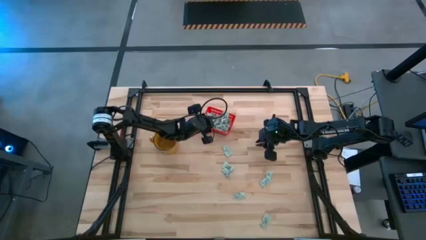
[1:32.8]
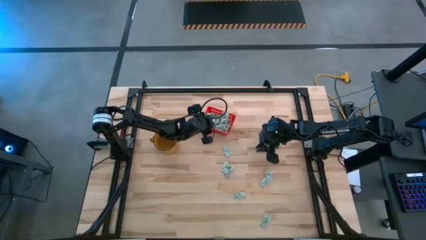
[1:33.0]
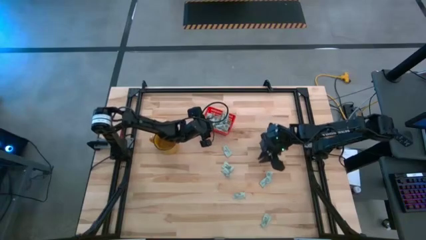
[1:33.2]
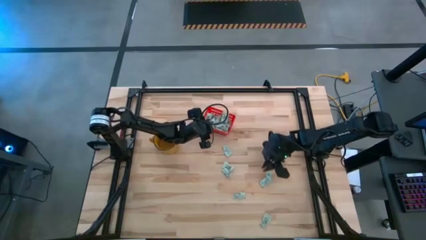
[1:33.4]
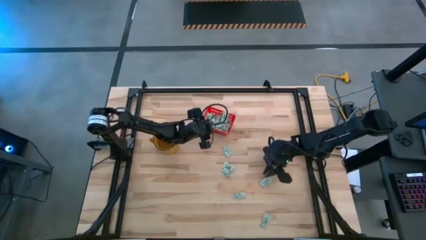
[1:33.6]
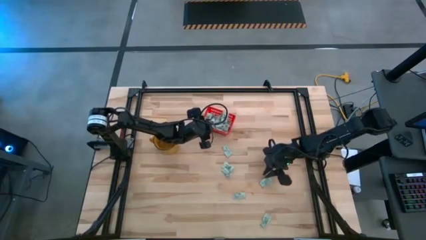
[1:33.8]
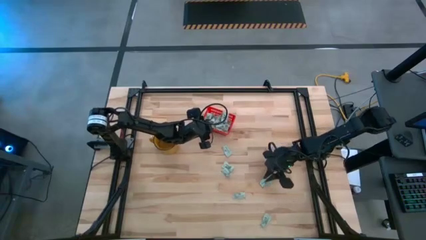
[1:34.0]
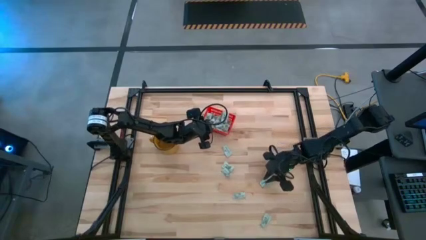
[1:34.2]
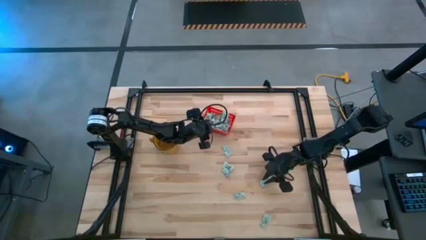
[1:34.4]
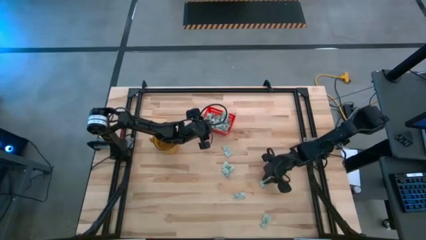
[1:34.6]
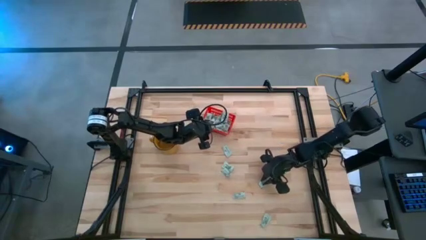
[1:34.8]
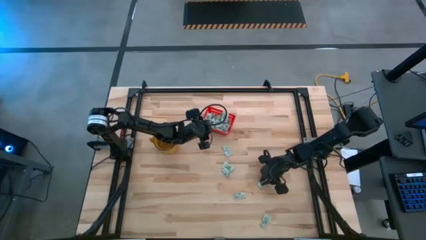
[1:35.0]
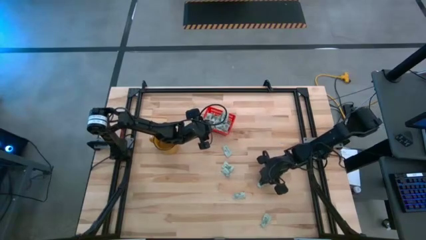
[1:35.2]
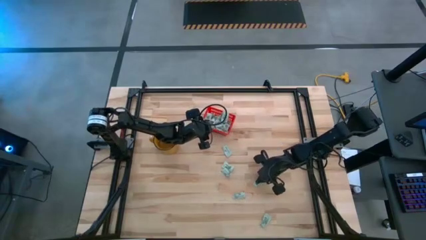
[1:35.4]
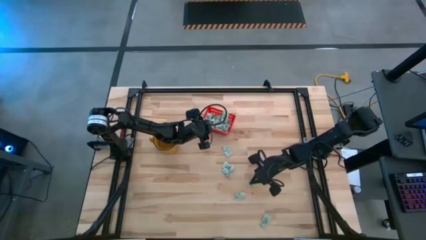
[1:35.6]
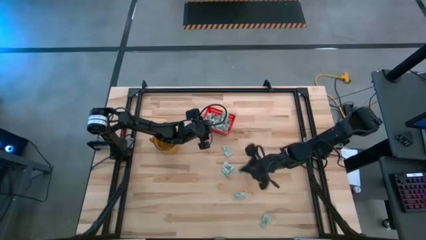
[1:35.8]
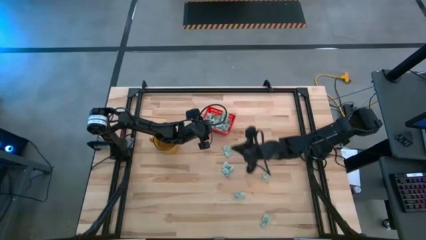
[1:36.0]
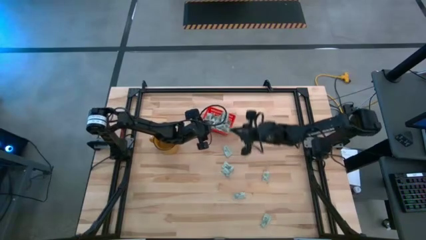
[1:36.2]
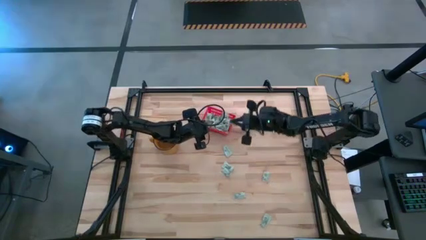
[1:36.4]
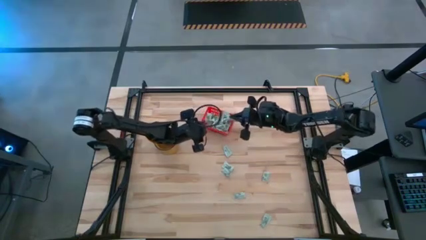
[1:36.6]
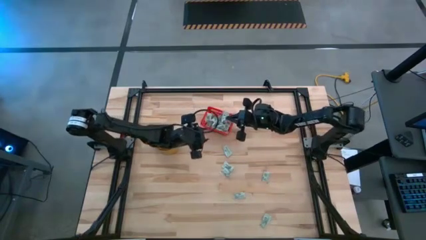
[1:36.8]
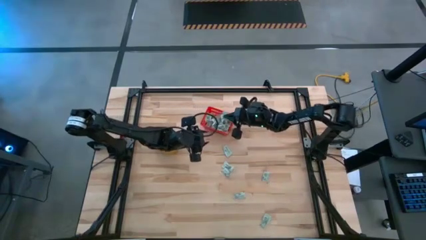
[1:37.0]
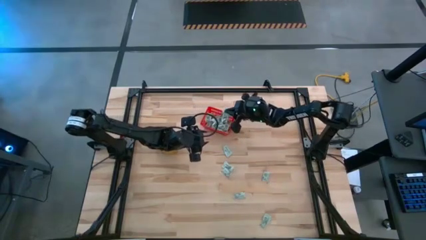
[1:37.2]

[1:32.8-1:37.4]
Task: Pick and place Stevia / Truvia into bins
Put the stevia packet into the red basket

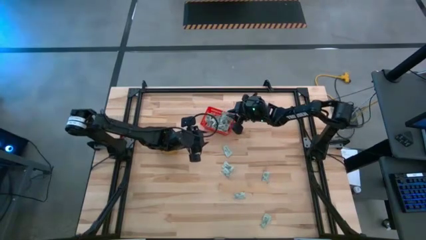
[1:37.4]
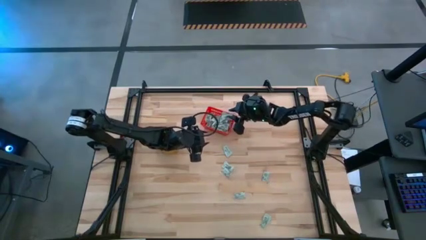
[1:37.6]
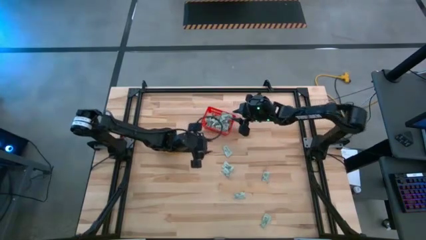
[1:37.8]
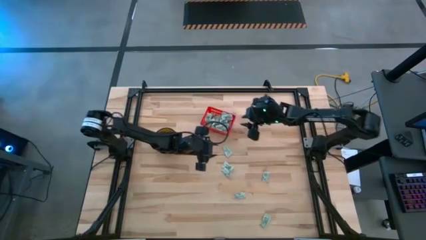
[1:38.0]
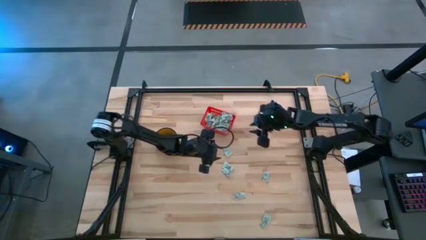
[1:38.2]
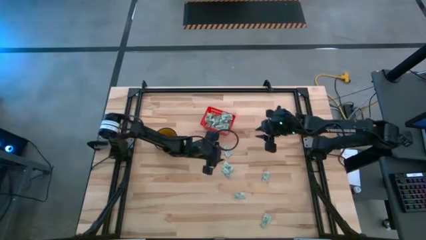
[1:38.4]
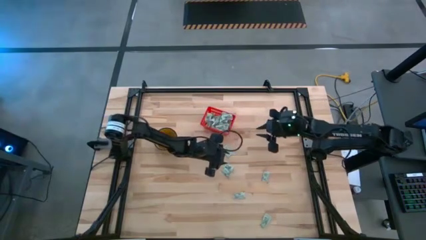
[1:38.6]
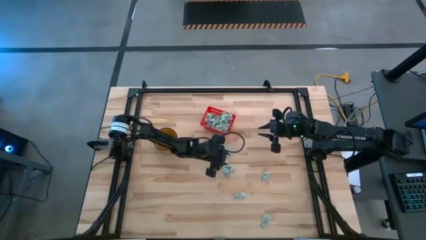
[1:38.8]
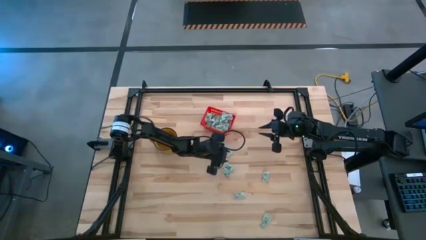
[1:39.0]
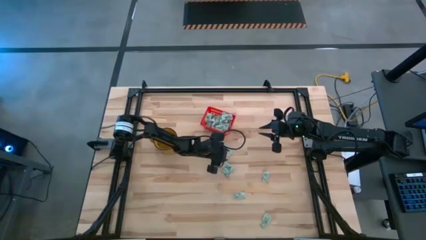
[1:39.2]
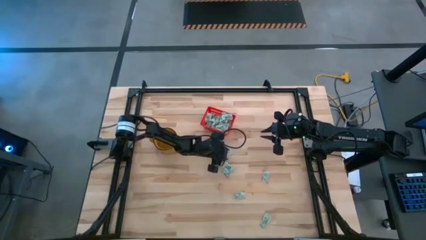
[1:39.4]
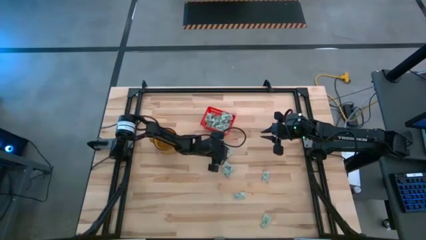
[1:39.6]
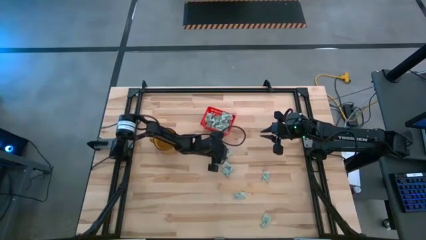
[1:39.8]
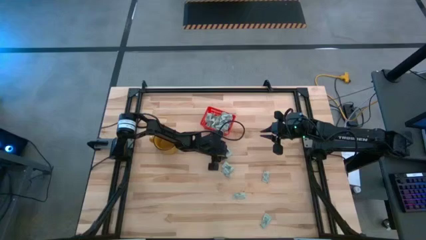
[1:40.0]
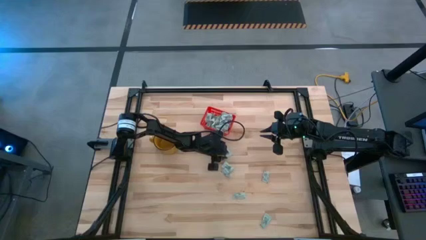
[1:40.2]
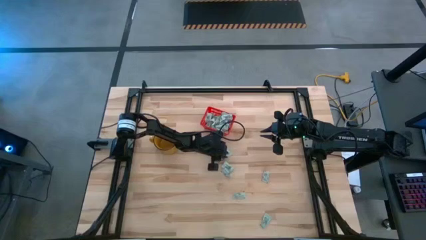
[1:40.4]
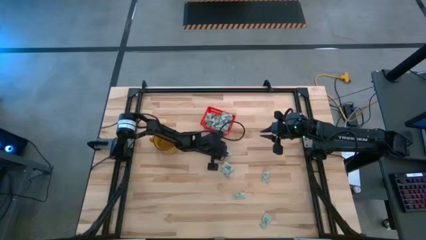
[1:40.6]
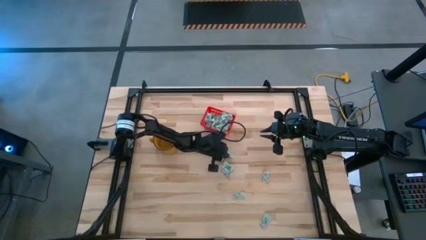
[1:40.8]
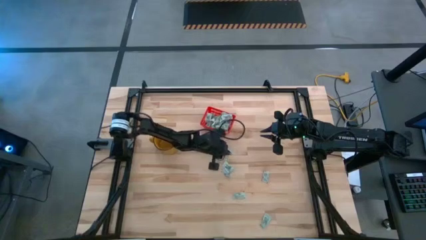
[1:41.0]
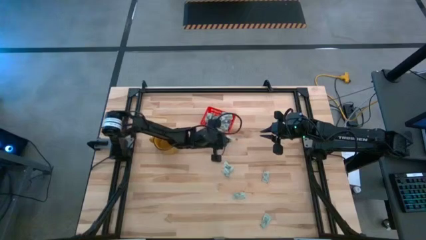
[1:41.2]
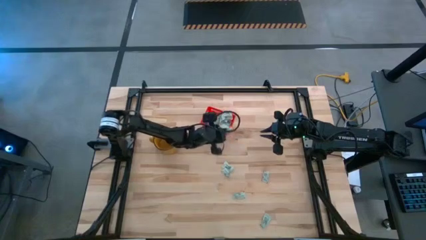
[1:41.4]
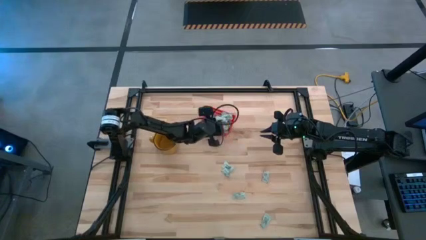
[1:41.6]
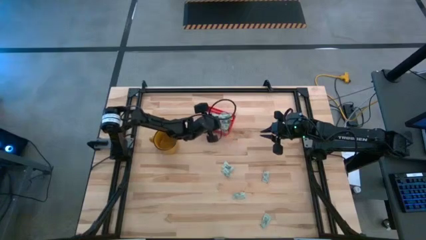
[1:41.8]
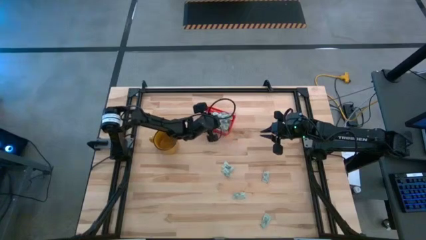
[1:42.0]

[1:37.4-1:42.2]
Put the stevia packet into the red basket

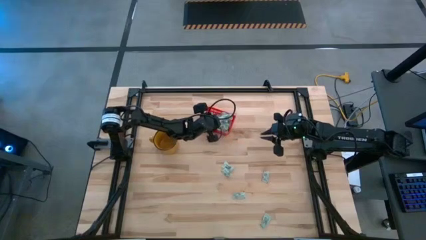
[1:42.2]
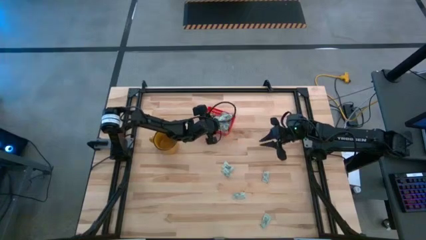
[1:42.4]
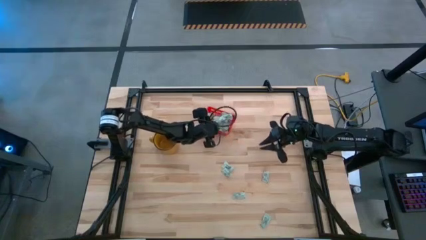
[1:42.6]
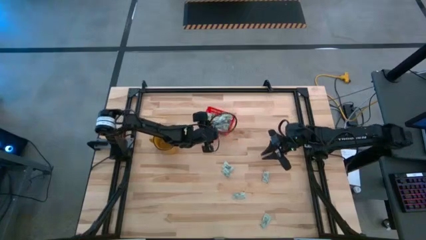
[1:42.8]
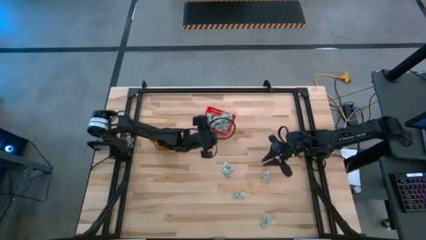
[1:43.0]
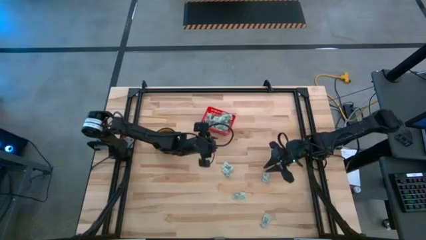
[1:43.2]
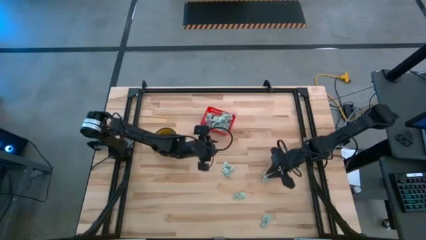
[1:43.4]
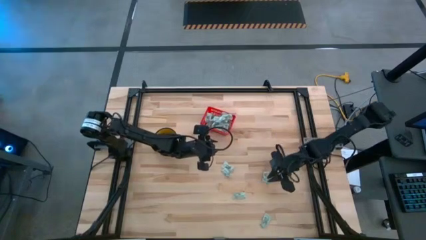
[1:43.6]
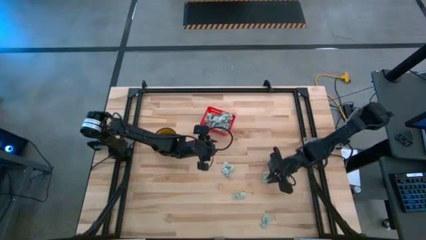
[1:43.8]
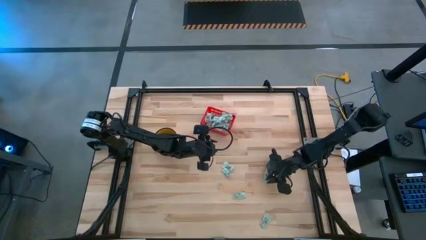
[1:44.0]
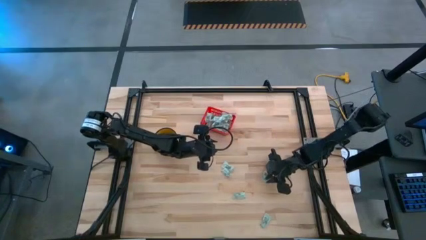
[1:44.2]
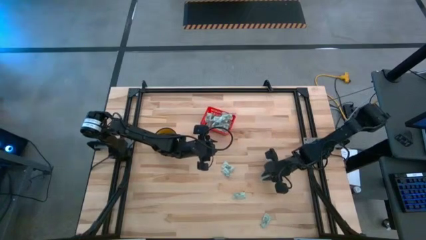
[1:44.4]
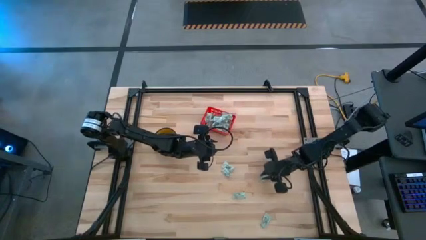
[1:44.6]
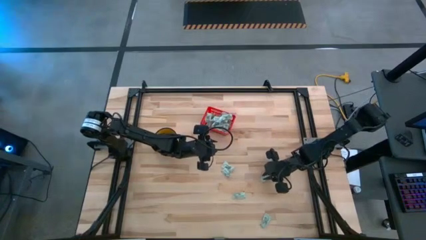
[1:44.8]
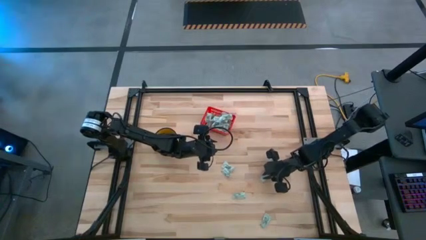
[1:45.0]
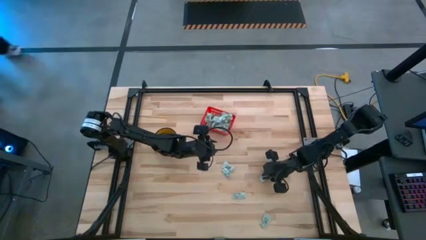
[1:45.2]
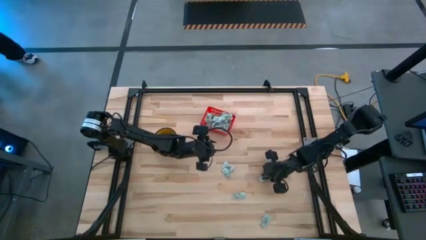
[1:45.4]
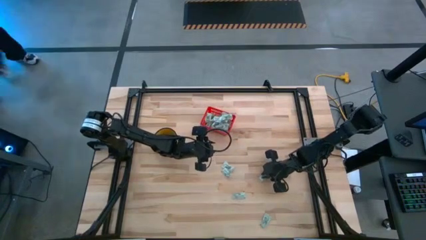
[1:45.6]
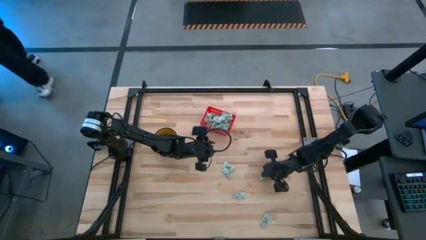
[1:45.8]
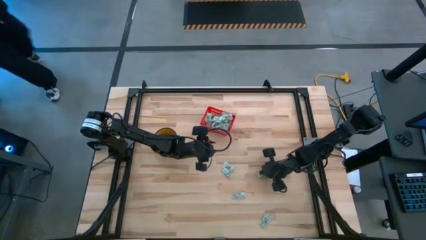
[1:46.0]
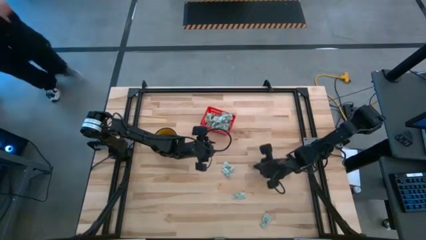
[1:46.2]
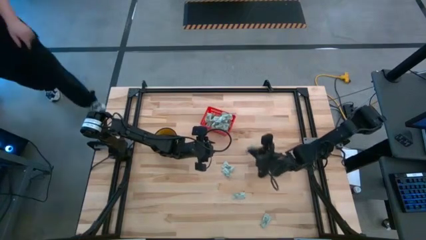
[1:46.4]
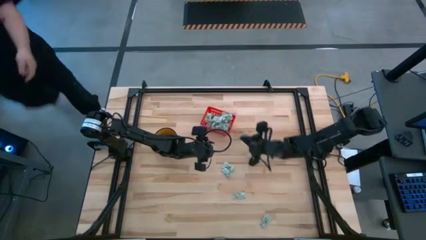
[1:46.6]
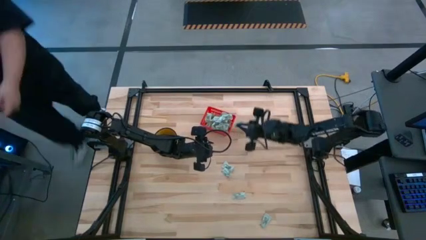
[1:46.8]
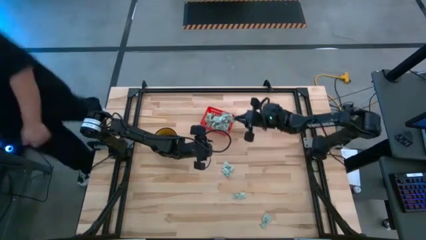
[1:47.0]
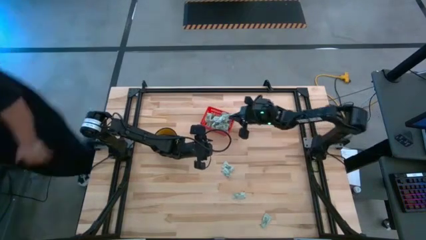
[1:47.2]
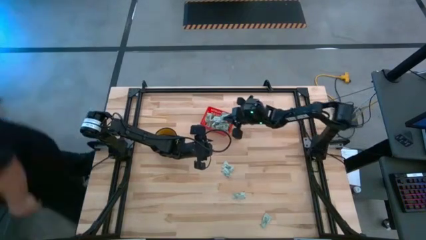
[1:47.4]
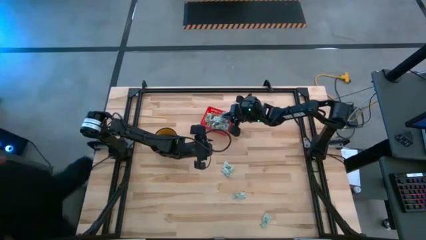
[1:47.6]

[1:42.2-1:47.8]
Put the stevia packet into the red basket

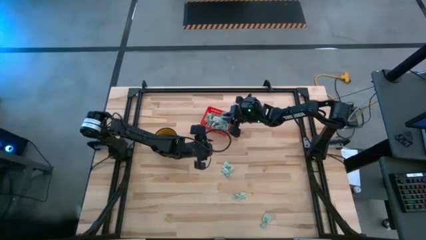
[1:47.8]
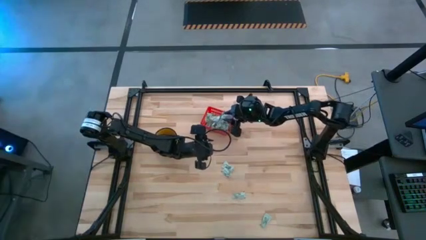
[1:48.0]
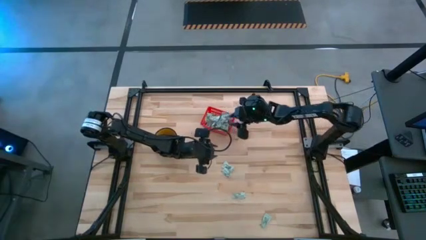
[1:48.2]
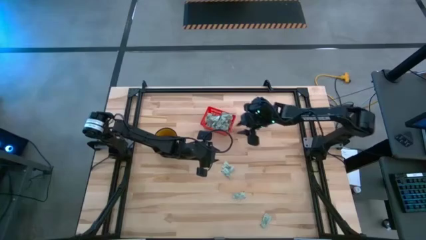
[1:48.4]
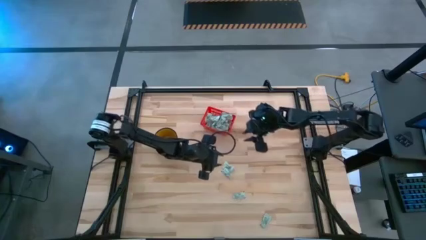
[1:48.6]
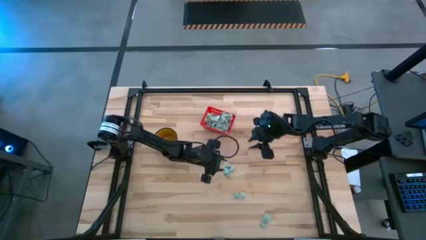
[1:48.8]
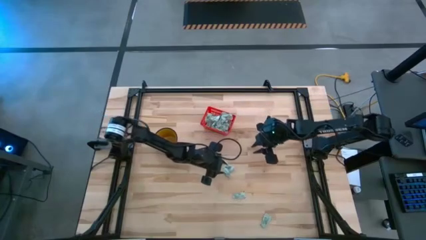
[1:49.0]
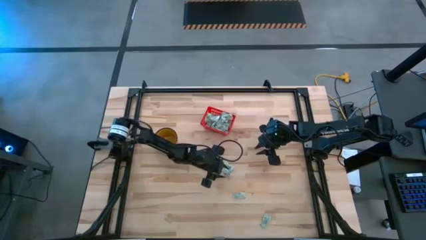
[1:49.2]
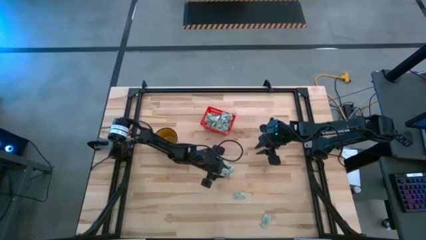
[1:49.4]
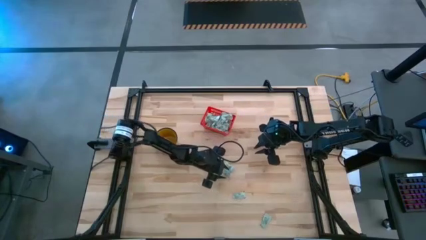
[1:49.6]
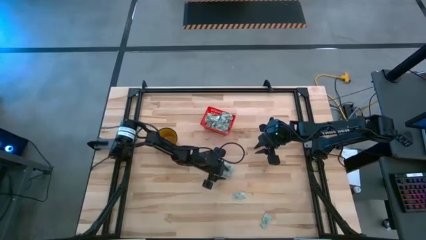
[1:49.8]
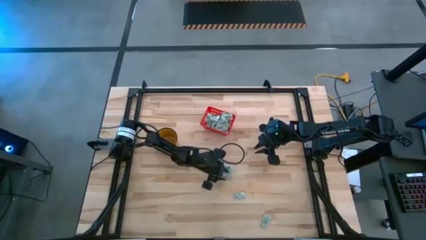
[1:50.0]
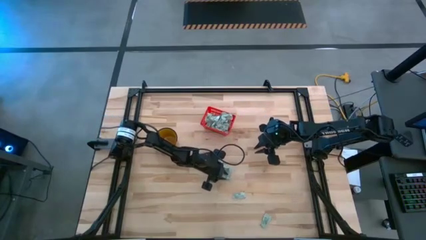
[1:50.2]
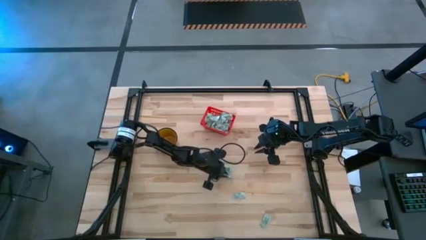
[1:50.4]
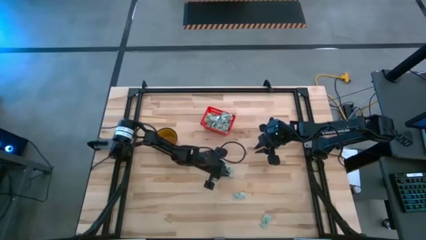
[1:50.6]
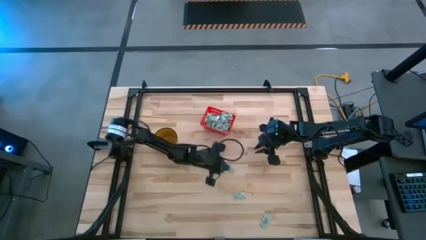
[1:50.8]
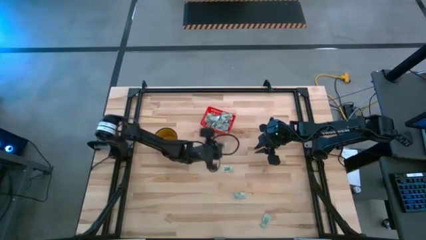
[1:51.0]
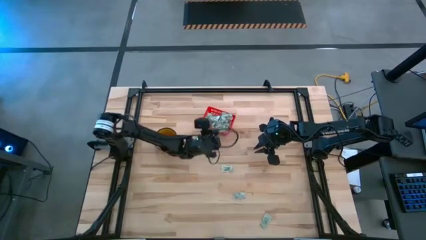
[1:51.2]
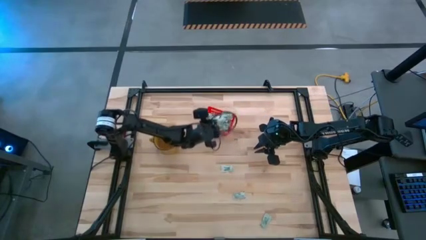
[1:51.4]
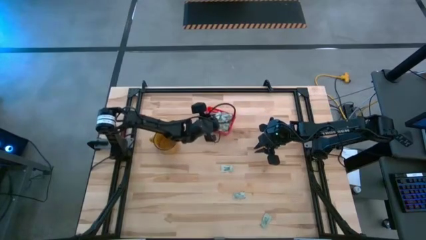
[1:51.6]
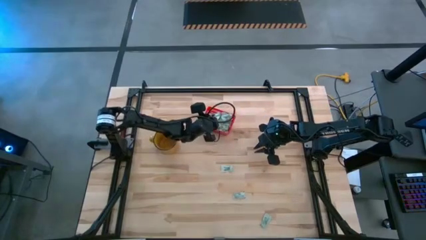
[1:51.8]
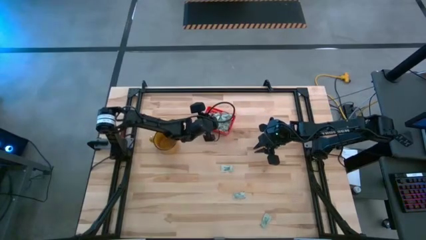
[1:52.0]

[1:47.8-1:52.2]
Put the stevia packet into the red basket
